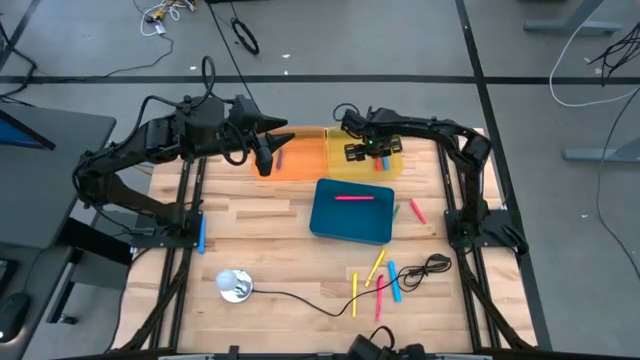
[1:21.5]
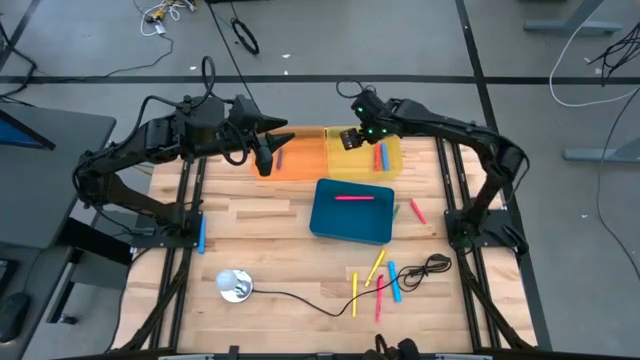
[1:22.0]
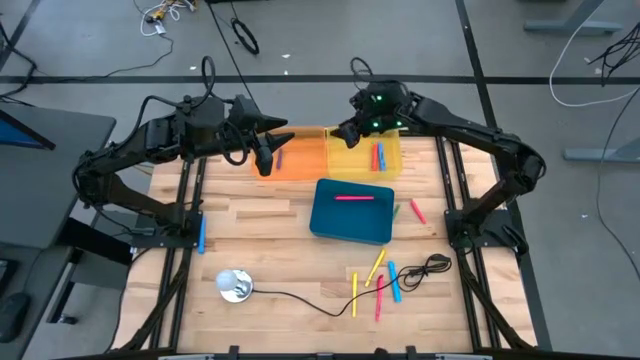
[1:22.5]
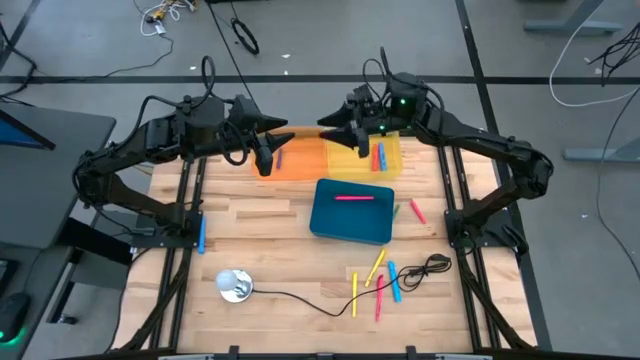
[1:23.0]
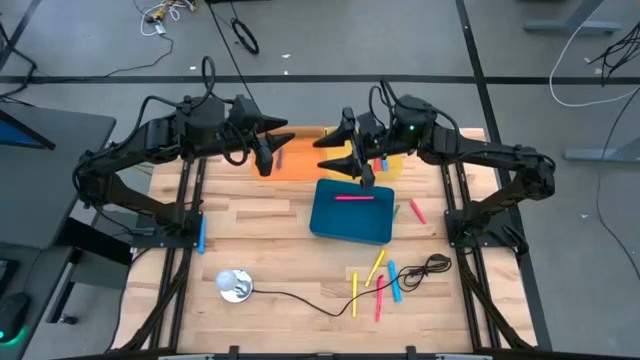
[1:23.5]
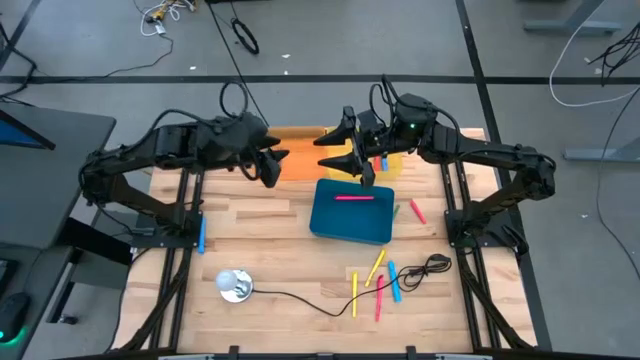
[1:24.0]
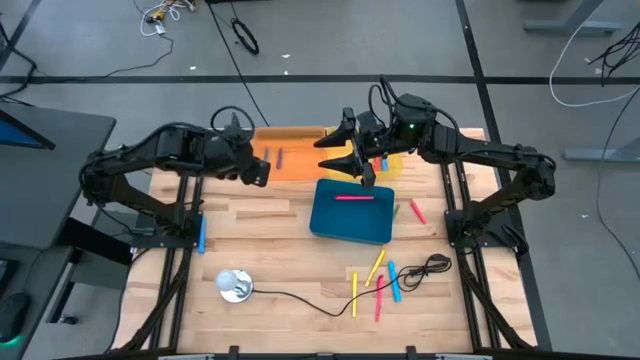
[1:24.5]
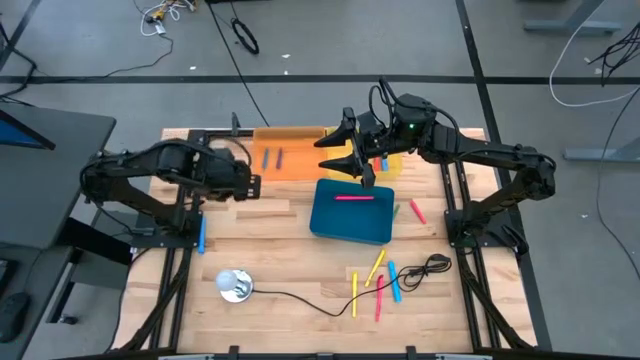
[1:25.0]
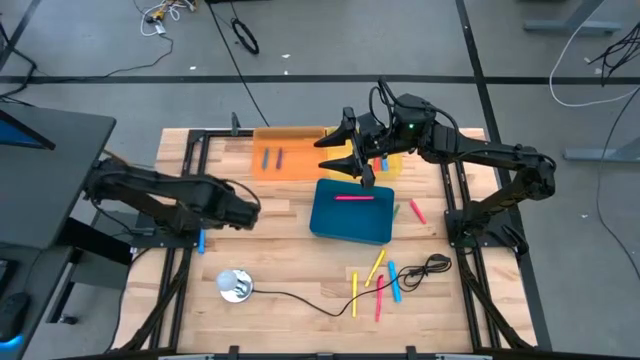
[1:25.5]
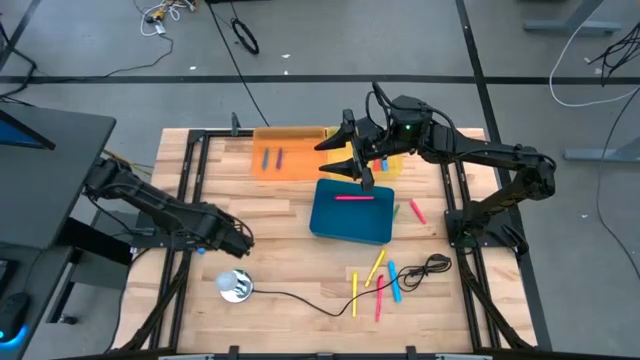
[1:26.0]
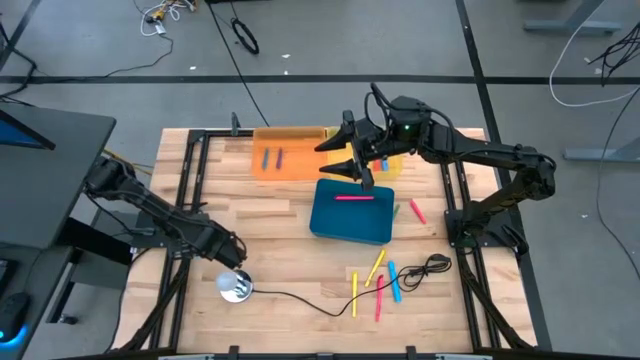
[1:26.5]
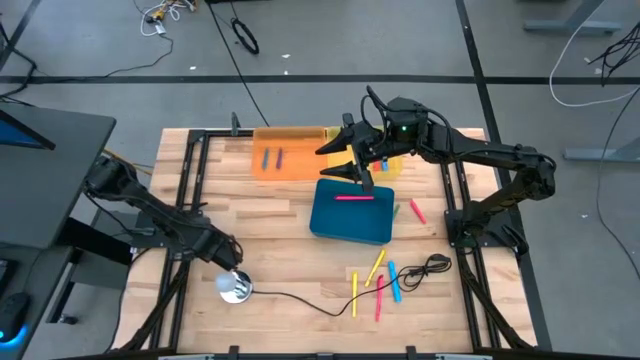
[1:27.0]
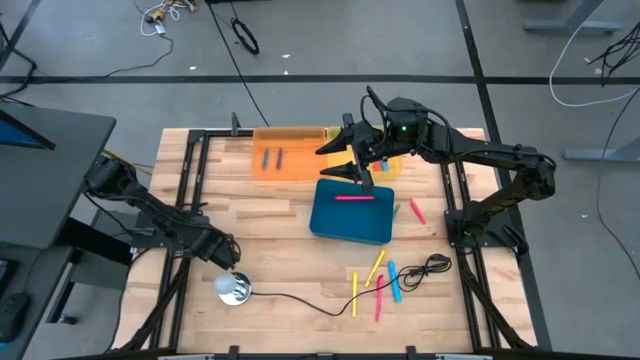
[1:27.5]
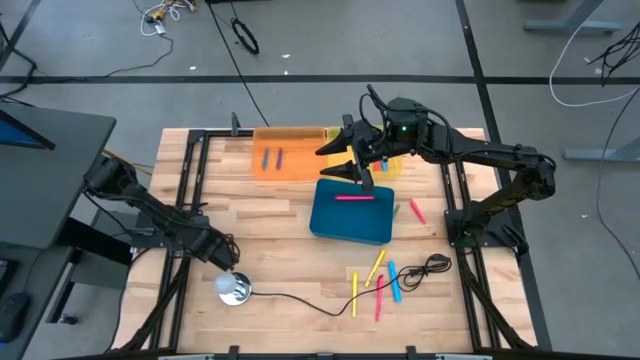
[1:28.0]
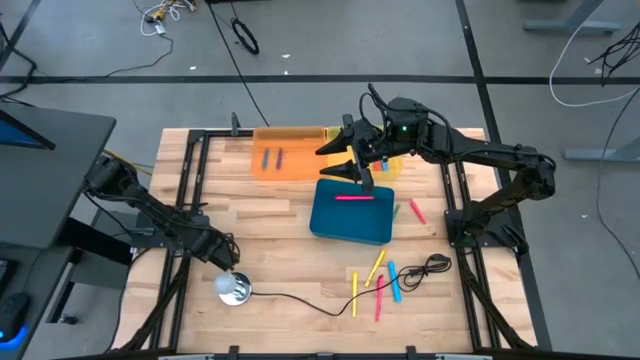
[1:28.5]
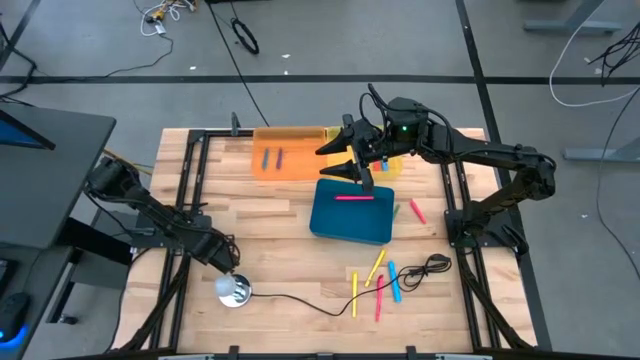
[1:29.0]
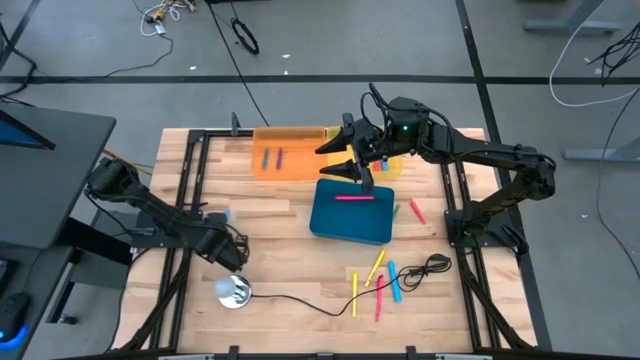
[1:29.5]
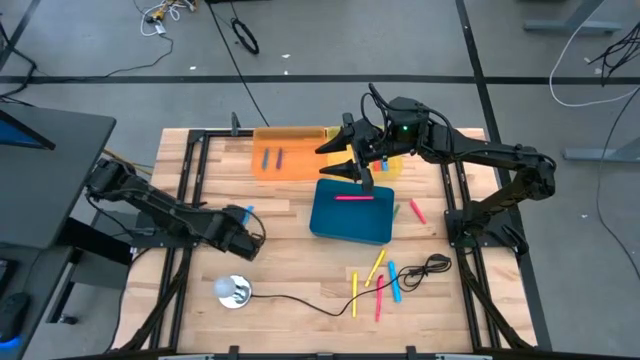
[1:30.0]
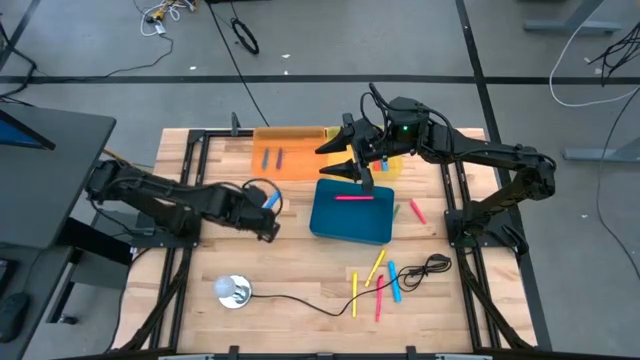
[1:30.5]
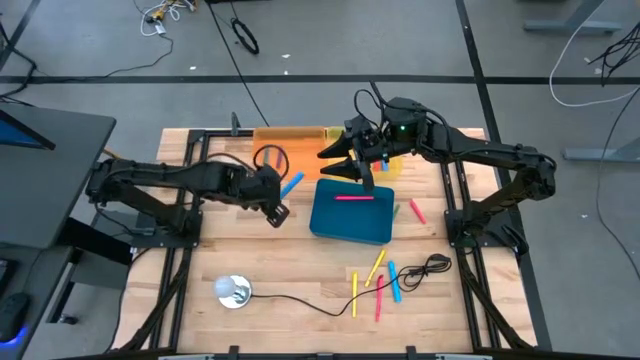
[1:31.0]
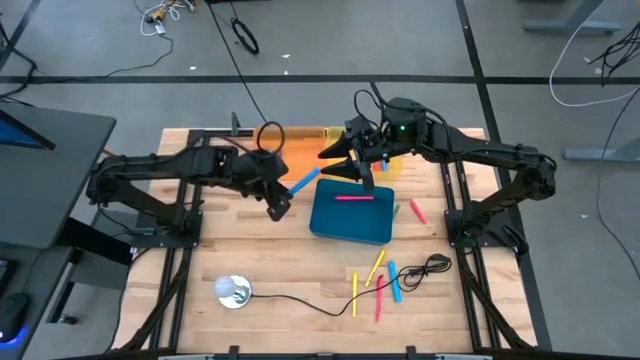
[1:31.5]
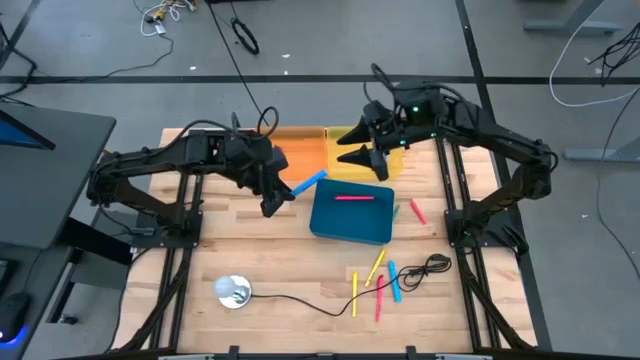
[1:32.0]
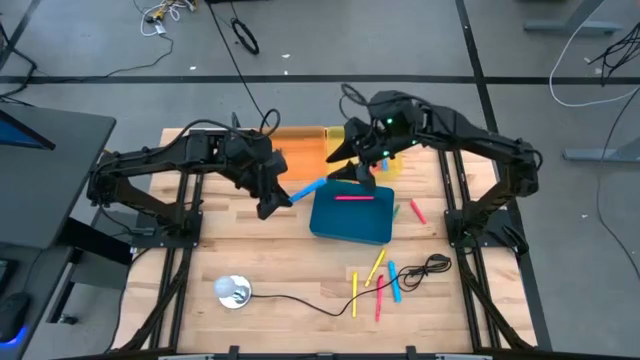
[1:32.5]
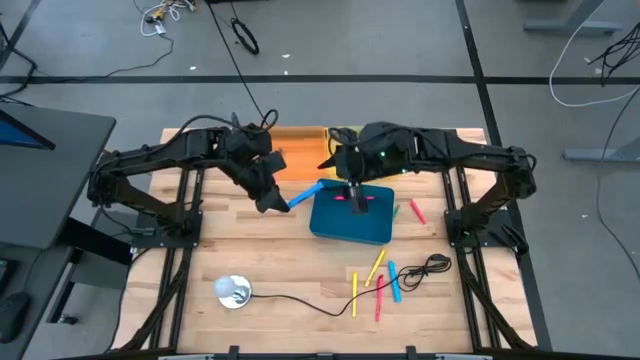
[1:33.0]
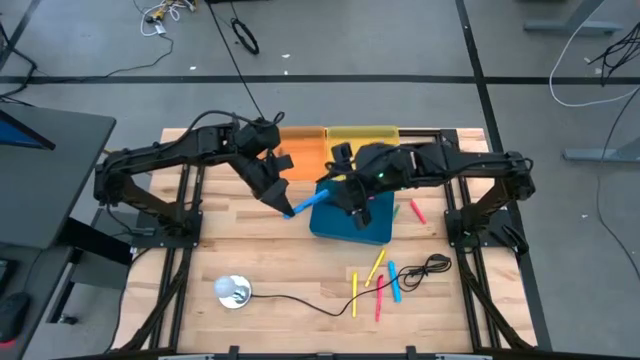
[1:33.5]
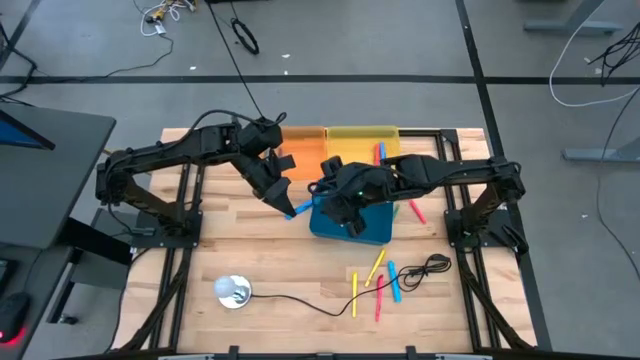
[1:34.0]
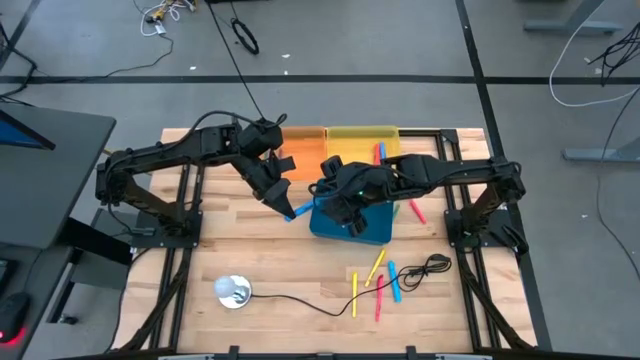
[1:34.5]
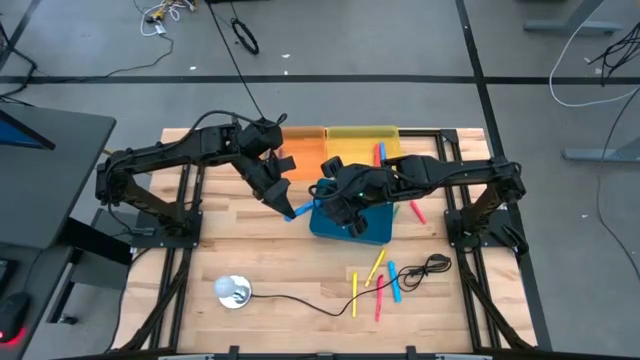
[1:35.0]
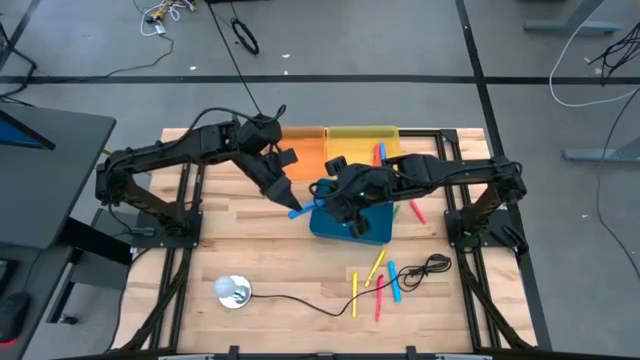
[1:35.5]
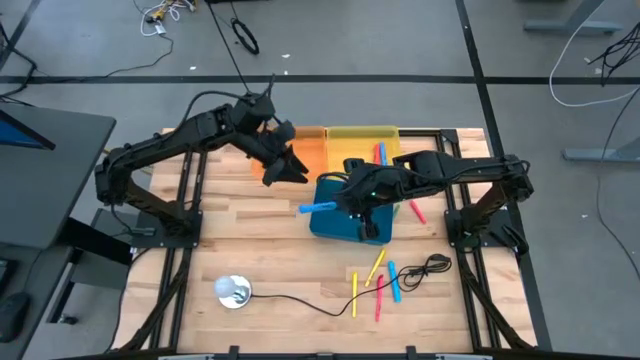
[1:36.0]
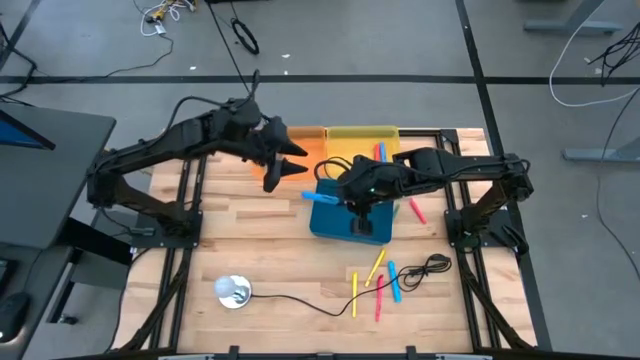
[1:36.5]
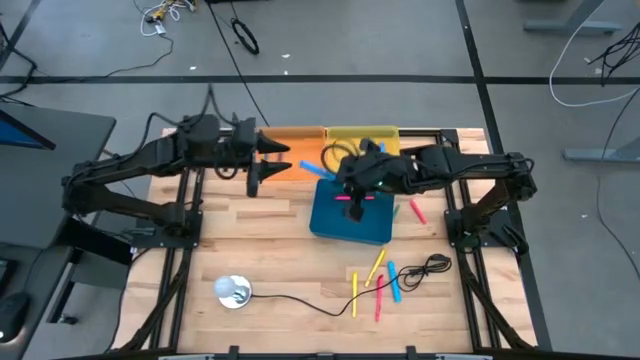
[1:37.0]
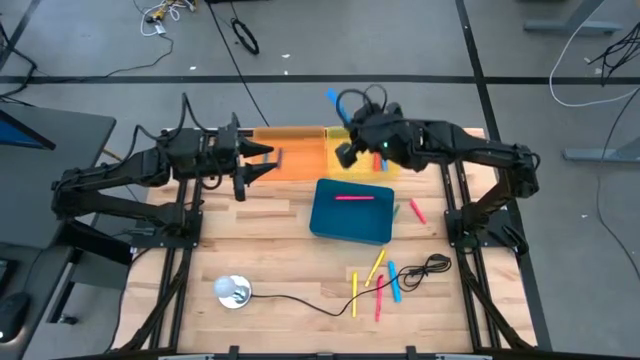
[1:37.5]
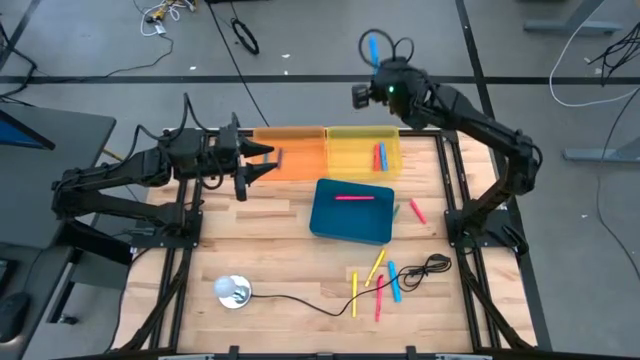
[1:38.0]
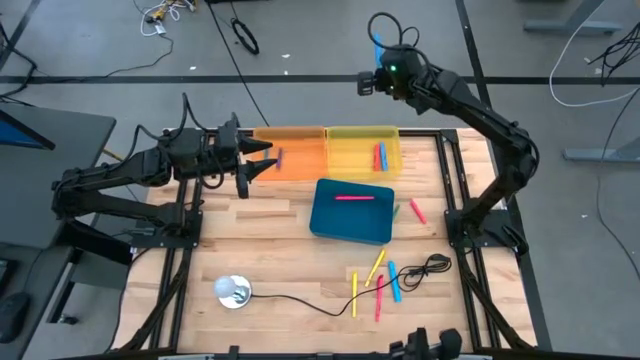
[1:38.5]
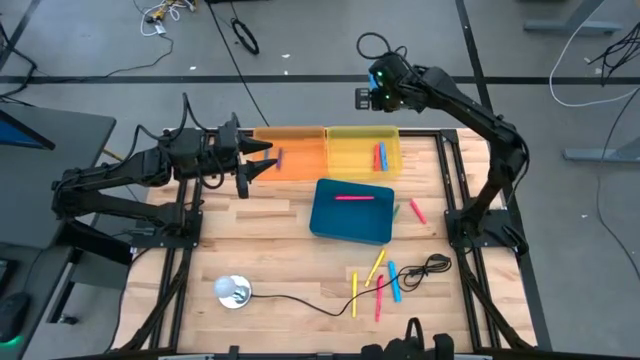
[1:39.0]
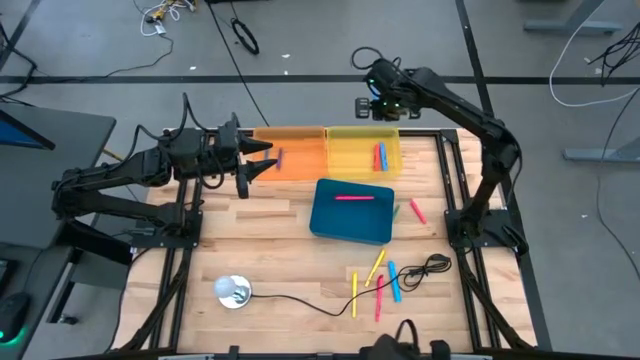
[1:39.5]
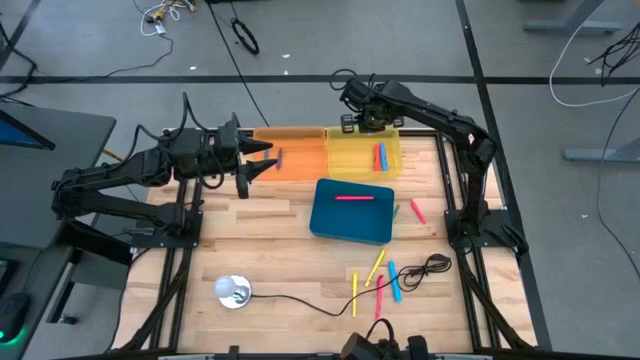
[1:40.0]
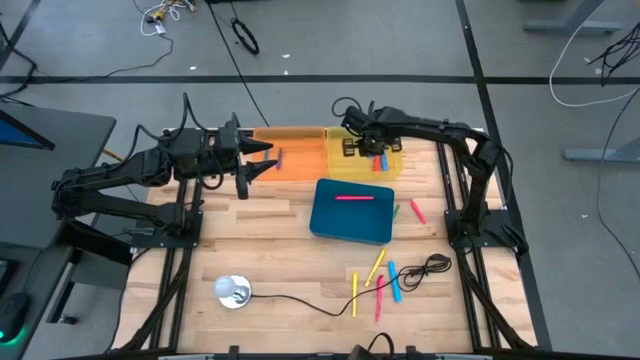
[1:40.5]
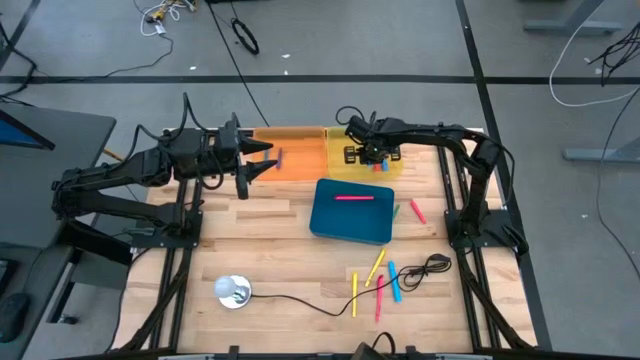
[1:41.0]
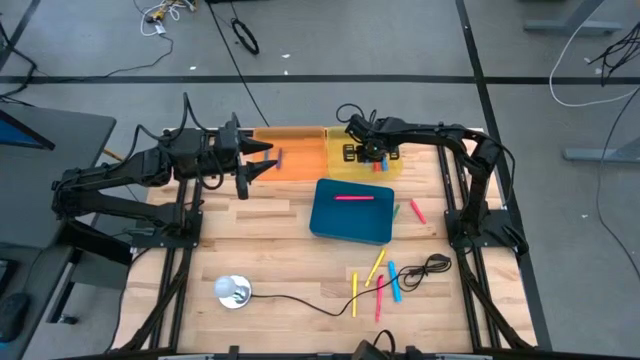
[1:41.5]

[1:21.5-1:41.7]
Task: Pick & Place Markers
Put the blue marker into the yellow transparent bin

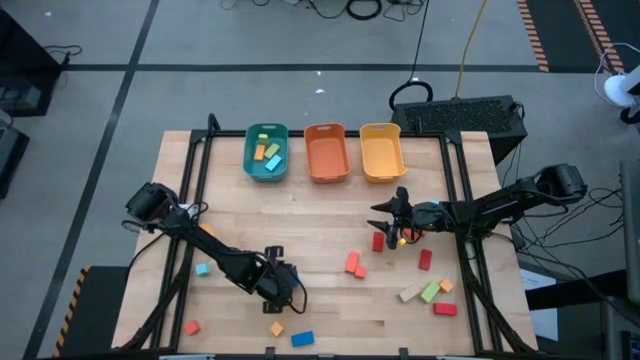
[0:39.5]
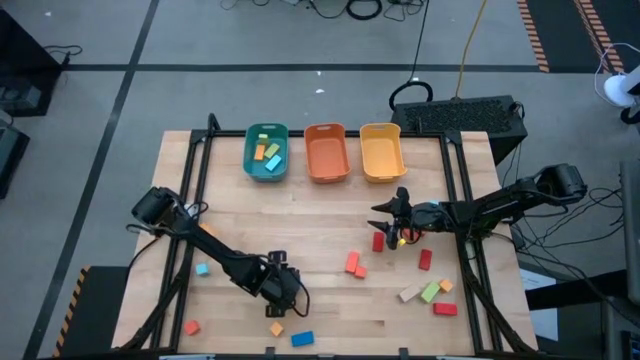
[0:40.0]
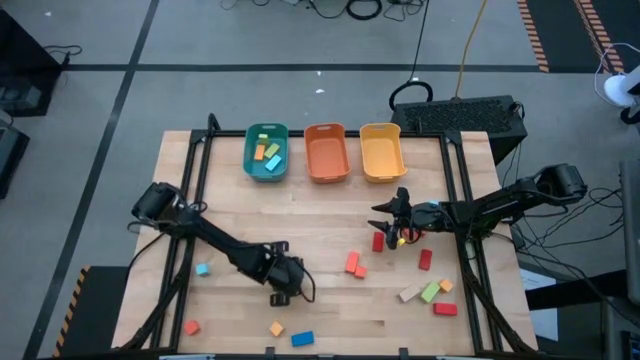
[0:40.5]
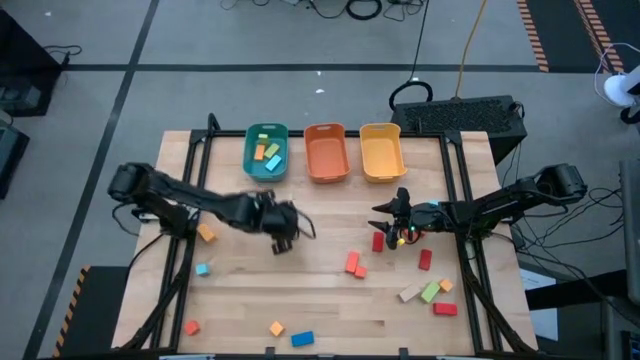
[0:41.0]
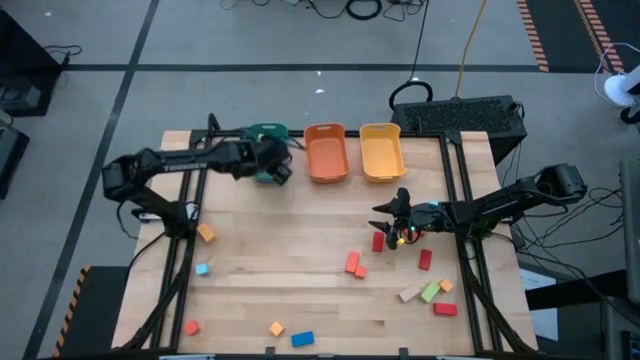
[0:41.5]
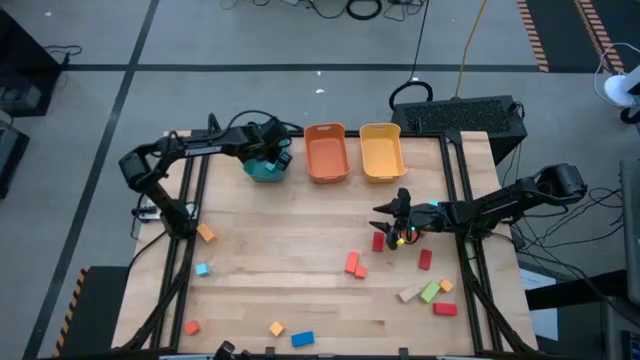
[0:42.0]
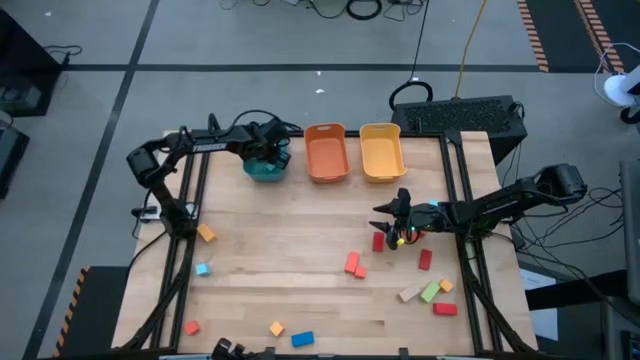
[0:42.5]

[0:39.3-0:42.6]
Task: Sort blocks by size
Put the blue thin rectangular block into the blue bin
